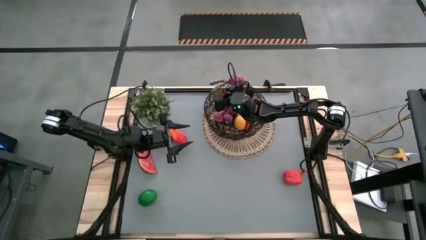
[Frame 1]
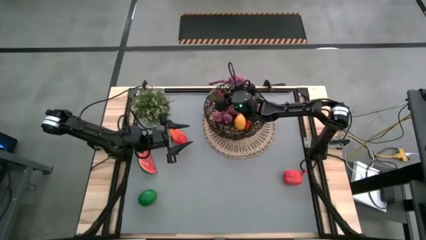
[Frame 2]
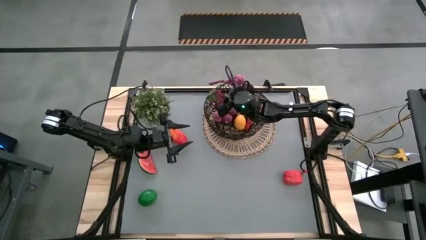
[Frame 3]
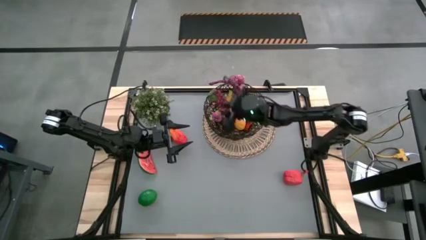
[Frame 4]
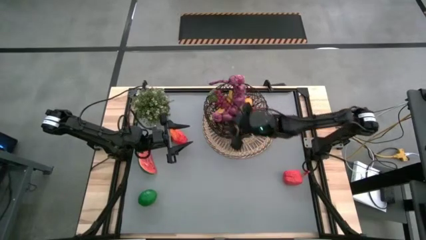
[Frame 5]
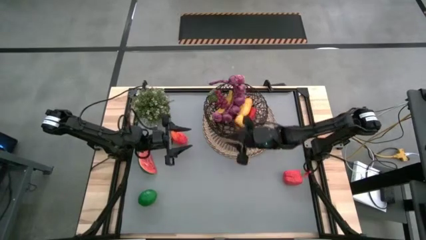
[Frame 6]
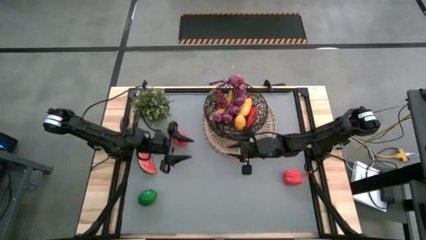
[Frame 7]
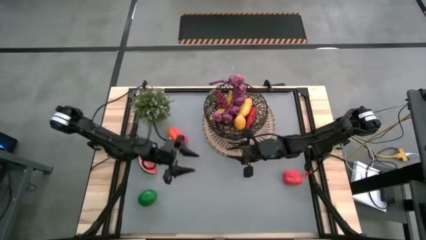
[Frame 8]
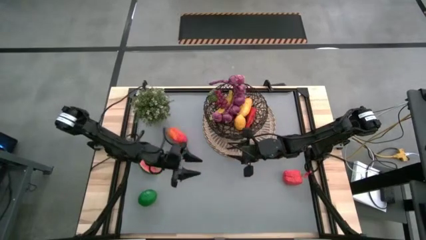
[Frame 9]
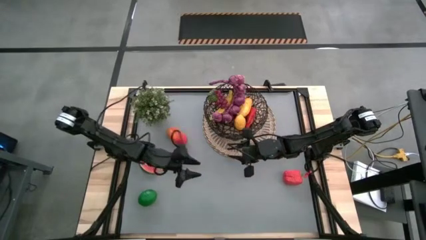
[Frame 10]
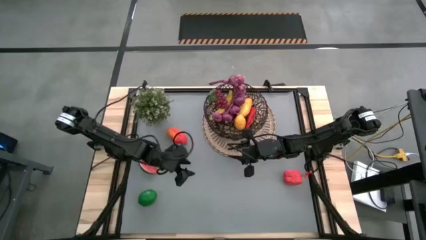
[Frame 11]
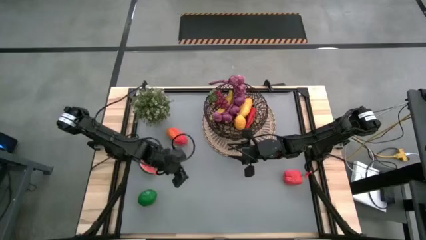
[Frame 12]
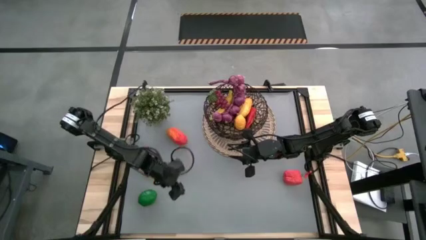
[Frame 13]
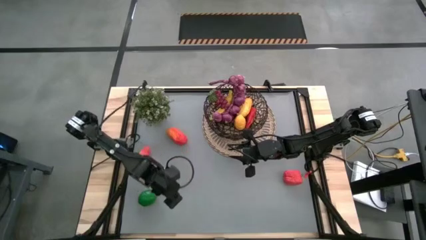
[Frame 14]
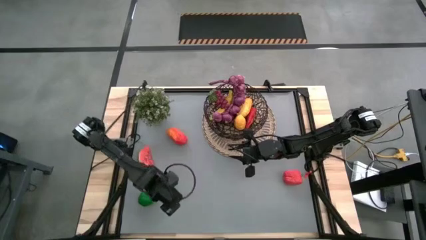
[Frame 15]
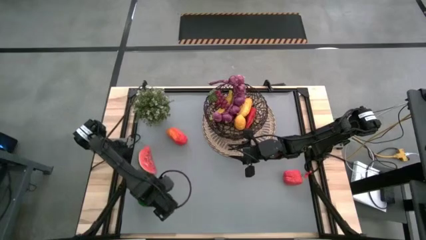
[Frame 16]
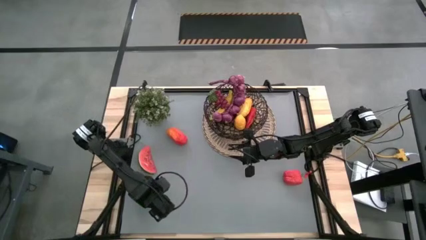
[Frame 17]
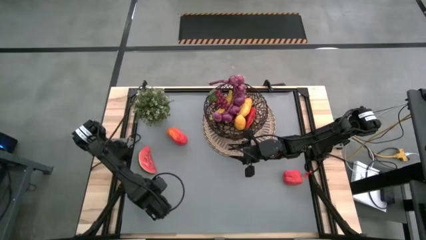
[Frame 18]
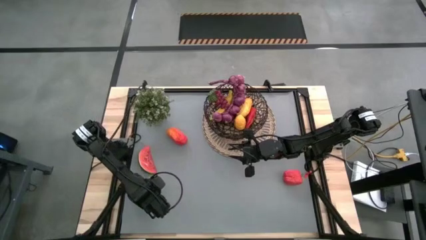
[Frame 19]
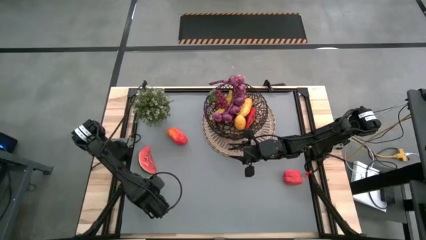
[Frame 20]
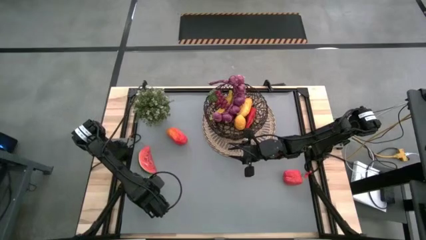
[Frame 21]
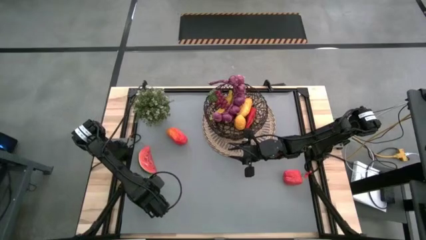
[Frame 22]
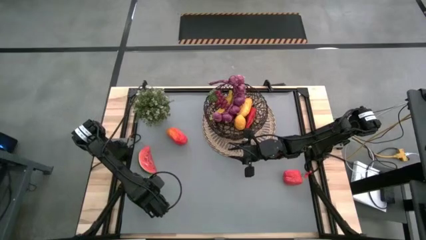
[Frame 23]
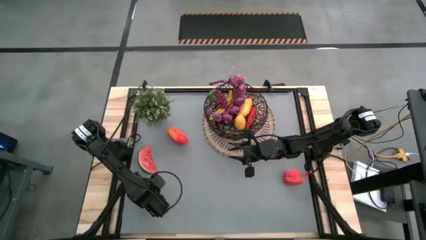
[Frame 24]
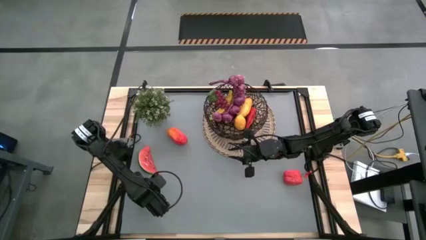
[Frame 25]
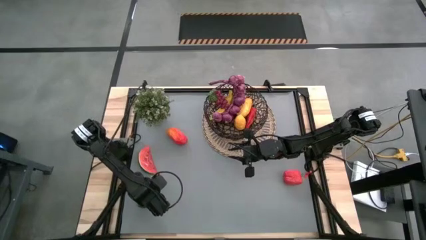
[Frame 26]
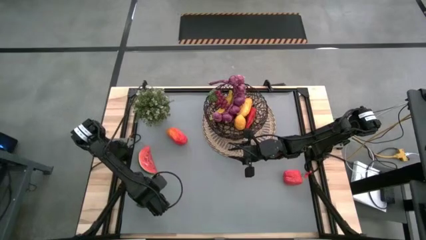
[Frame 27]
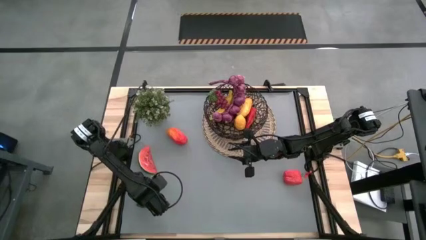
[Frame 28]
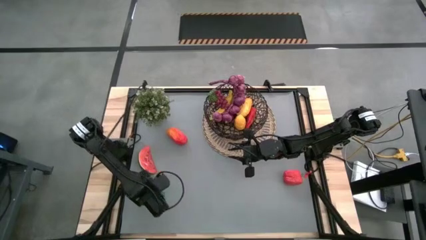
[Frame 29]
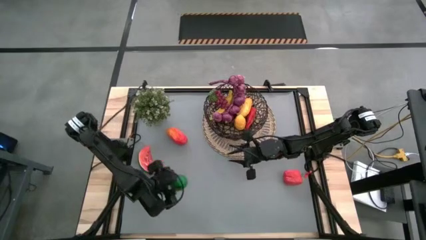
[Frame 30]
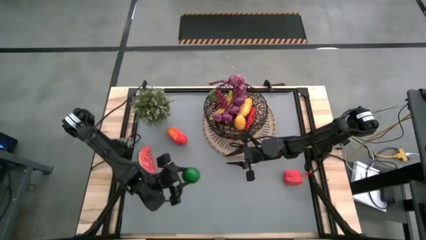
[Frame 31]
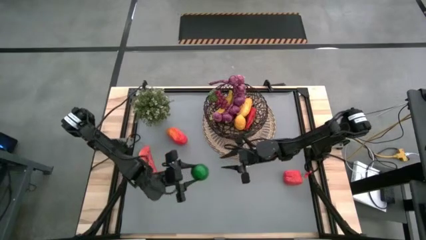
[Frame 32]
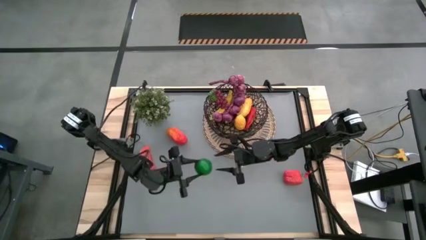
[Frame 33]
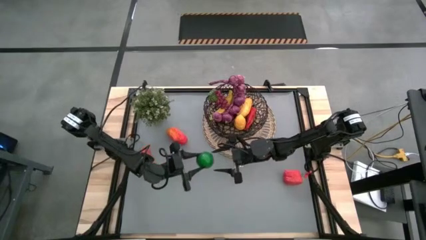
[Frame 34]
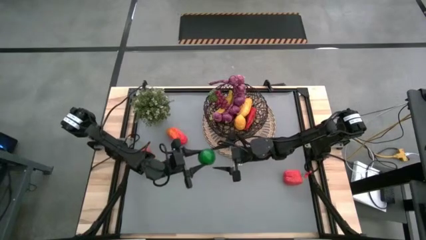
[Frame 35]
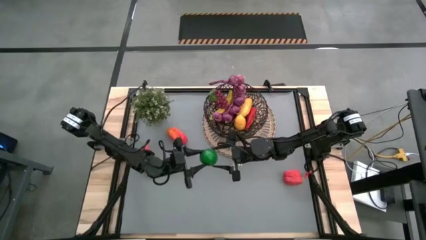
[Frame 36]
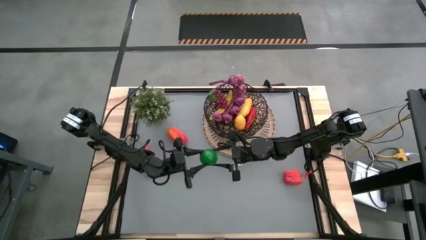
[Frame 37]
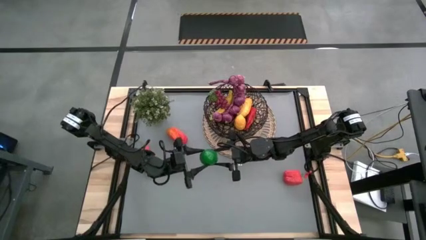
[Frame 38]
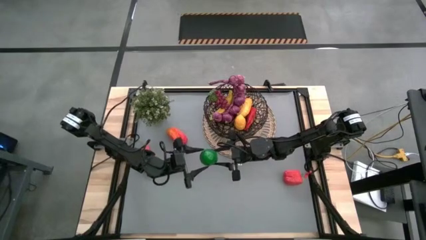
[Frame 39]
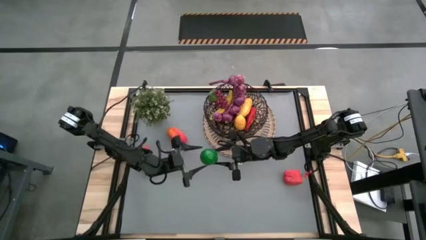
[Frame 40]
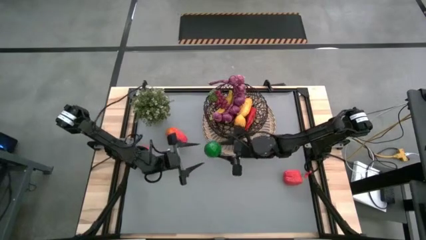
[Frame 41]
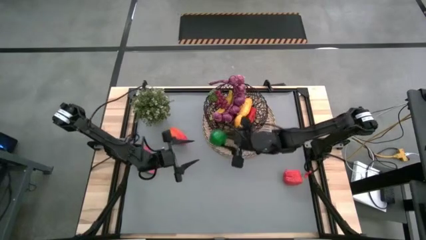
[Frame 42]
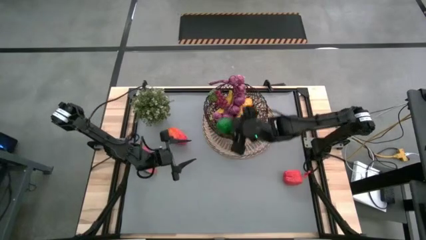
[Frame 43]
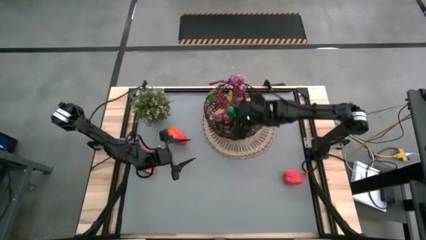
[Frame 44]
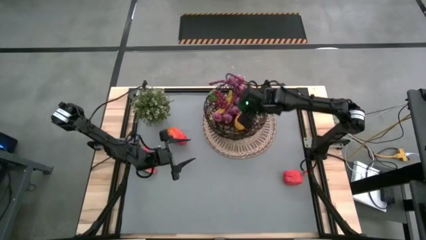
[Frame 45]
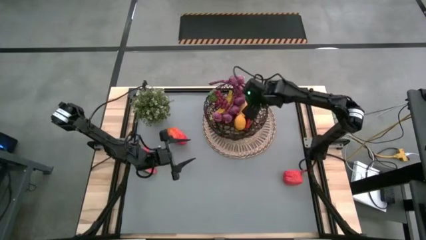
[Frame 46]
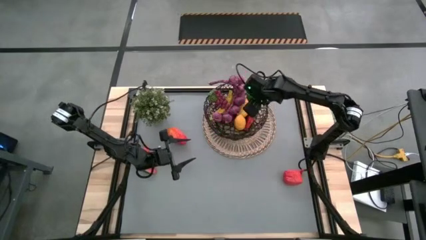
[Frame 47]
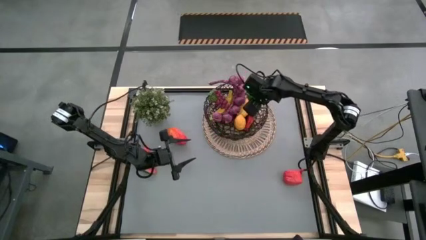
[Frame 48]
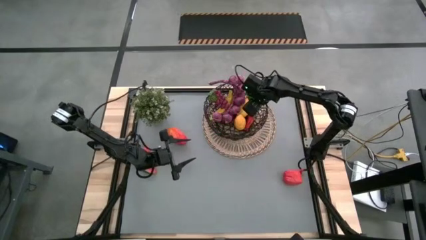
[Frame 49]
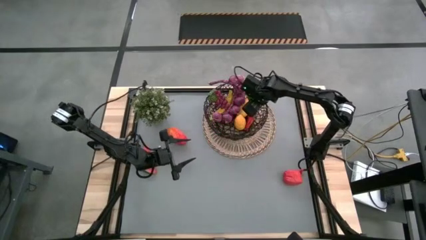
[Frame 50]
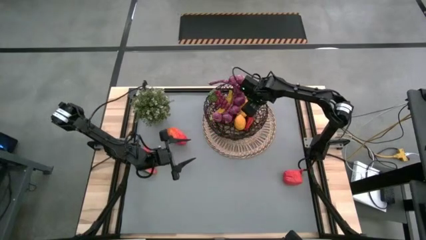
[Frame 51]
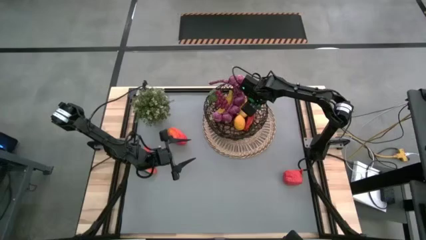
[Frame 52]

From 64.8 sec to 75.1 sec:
Task: Build produce basket
Put the lime into the black wire basket

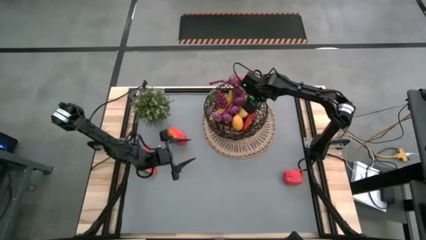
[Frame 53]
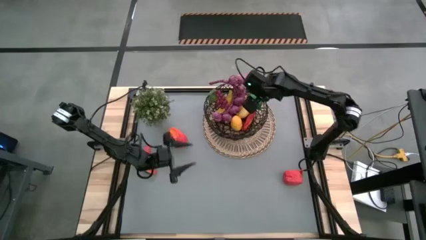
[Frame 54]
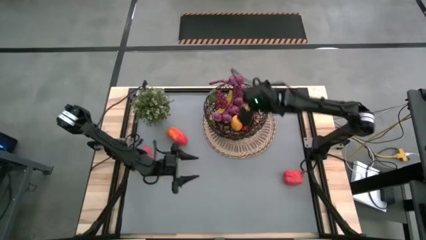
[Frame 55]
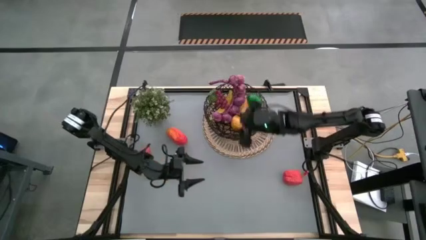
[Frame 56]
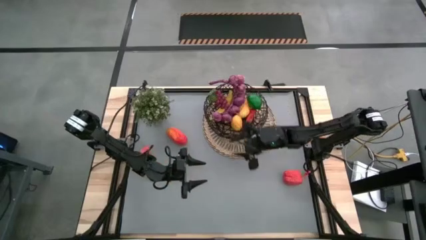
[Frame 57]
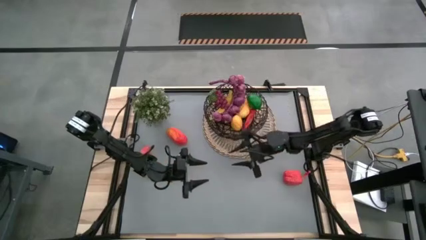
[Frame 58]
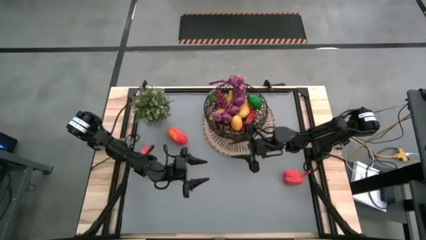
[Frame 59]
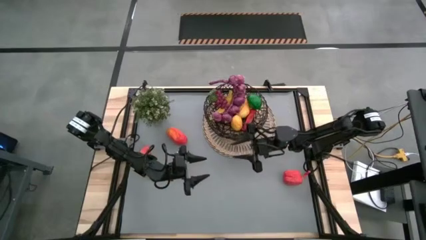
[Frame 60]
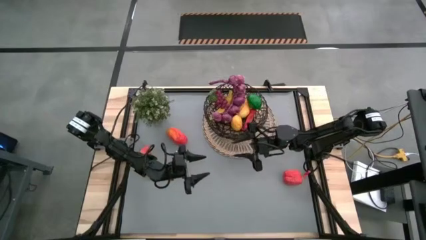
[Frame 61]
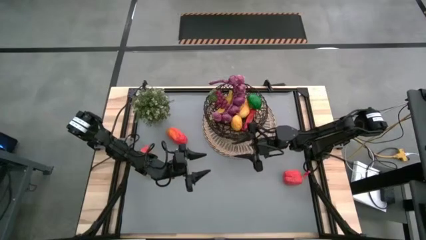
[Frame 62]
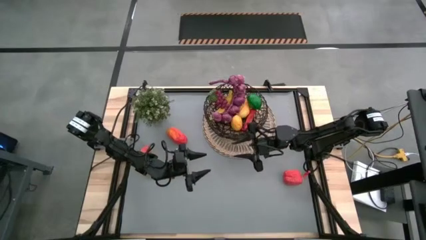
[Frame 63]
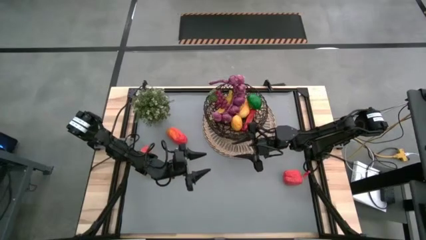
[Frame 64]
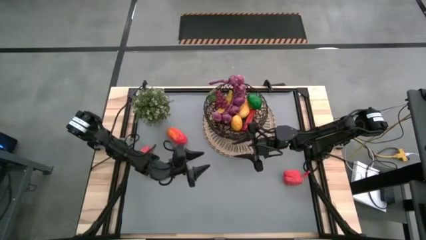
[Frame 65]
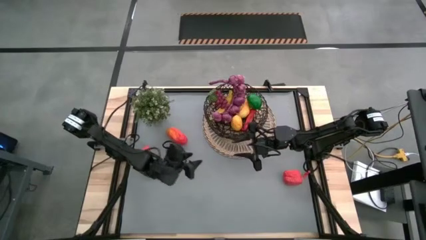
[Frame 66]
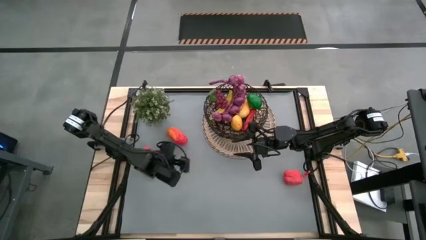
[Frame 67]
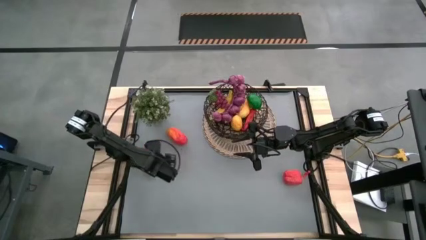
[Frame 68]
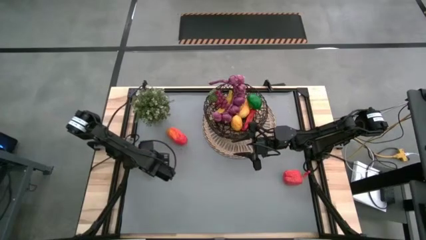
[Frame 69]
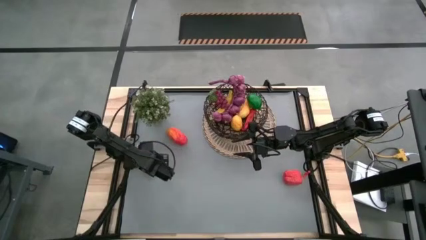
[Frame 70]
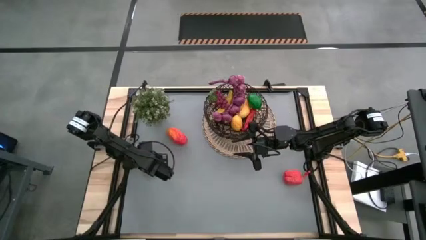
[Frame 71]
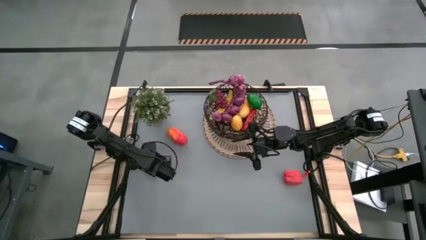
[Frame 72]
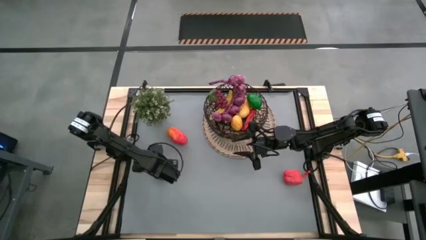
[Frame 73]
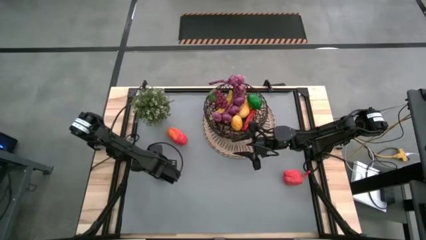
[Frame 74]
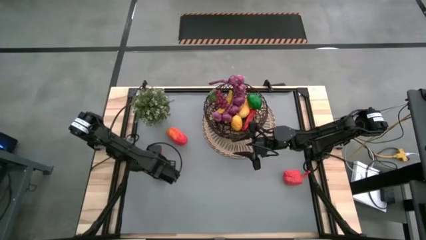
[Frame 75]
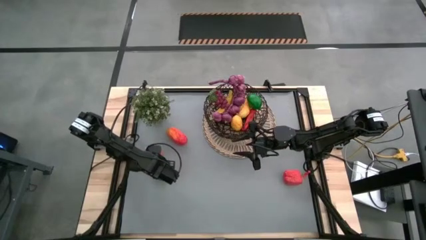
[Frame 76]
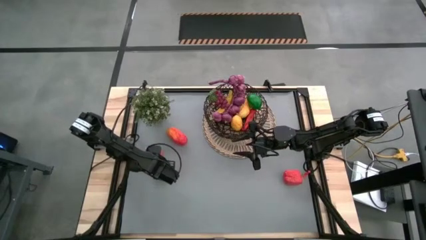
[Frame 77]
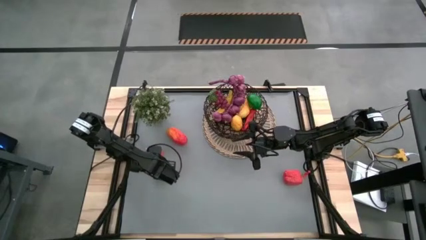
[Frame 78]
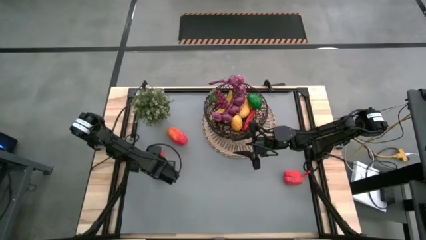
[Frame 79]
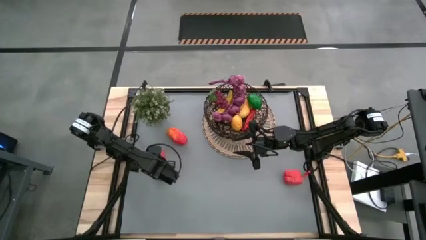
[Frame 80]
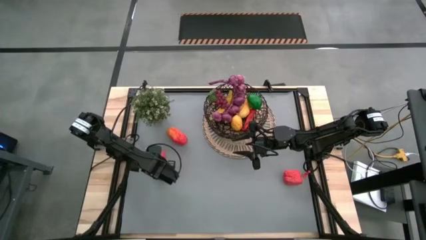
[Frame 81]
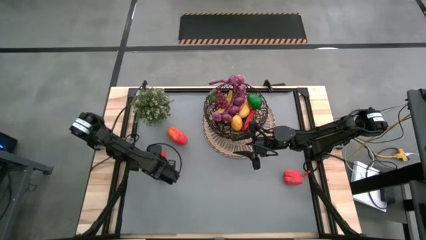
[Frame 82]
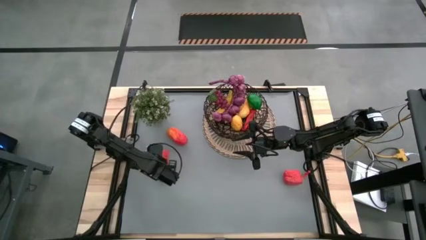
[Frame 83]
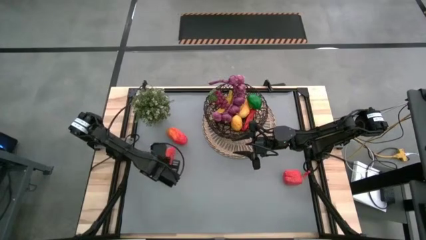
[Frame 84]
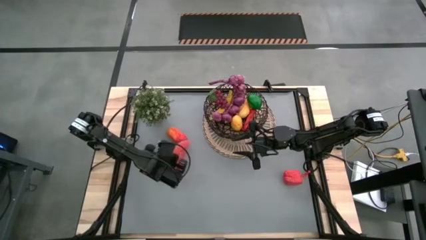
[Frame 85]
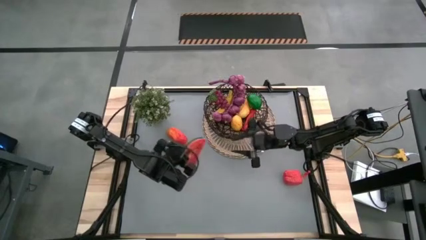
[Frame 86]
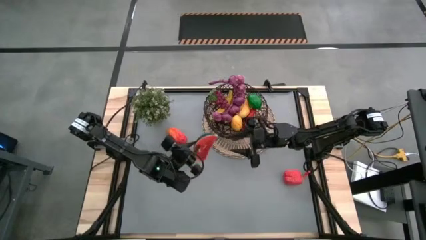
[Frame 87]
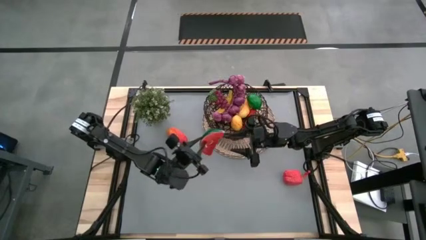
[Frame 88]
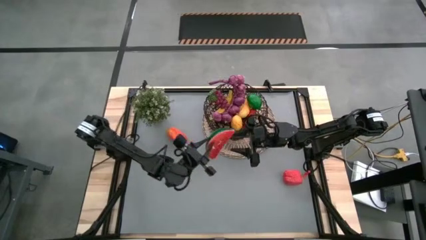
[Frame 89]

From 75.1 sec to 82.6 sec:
Put the watermelon into the black wire basket
